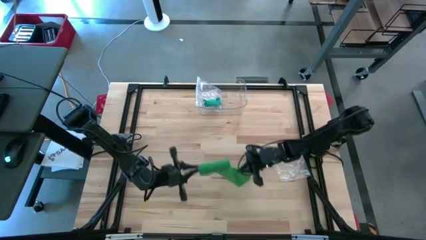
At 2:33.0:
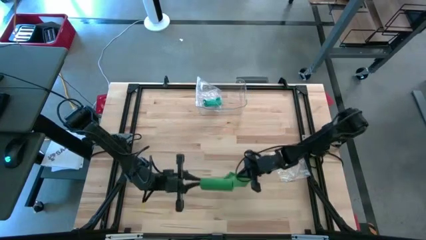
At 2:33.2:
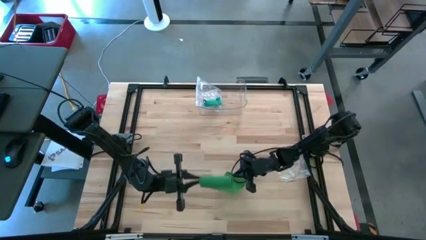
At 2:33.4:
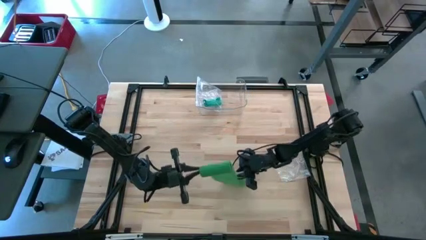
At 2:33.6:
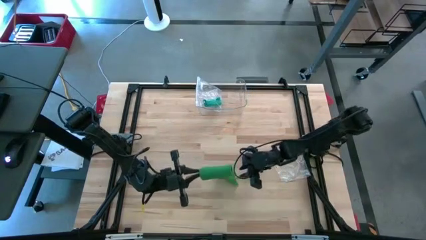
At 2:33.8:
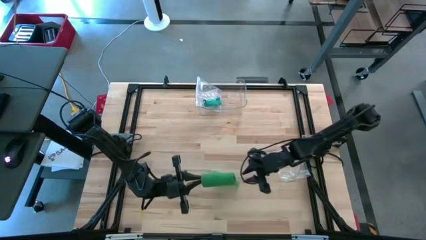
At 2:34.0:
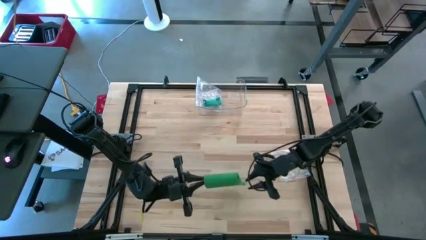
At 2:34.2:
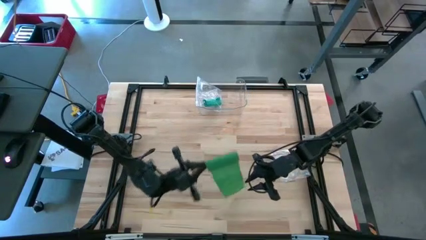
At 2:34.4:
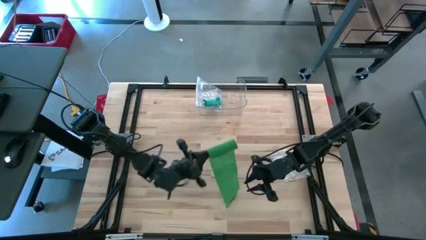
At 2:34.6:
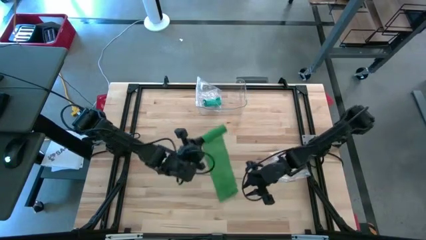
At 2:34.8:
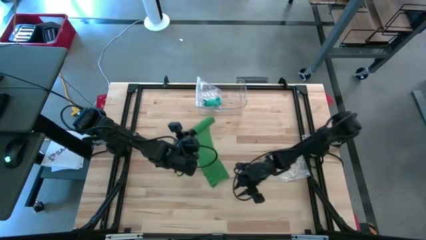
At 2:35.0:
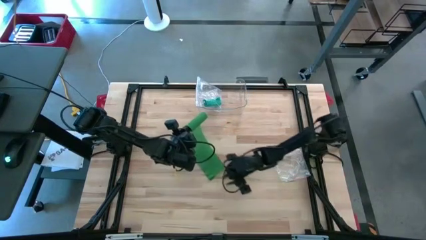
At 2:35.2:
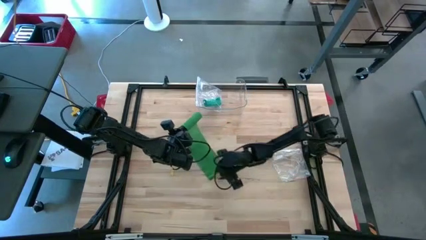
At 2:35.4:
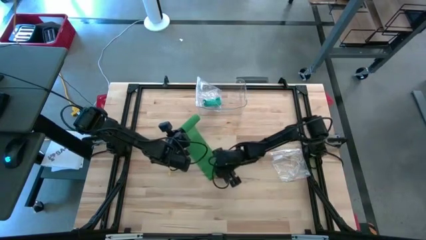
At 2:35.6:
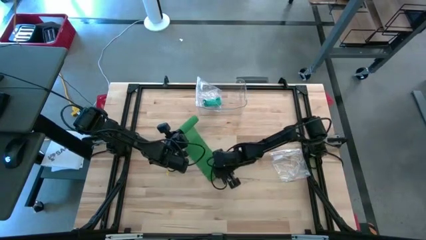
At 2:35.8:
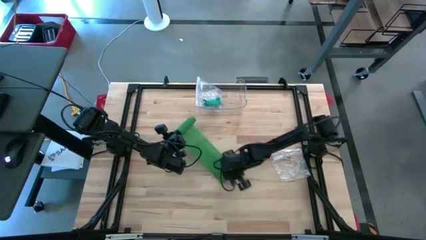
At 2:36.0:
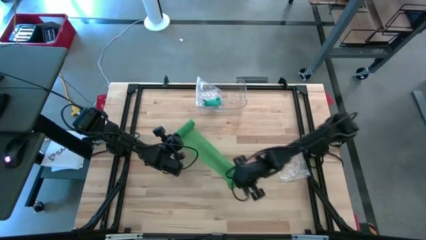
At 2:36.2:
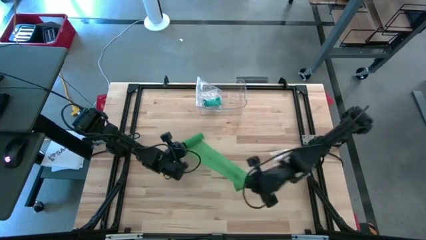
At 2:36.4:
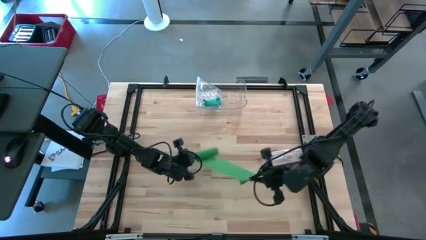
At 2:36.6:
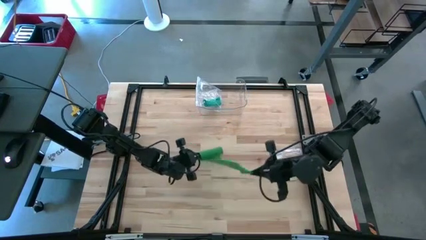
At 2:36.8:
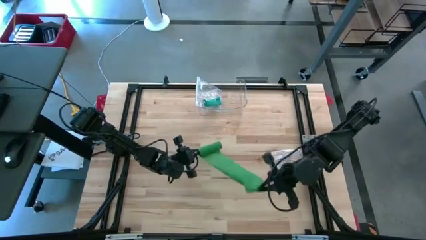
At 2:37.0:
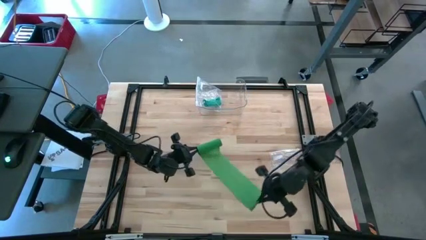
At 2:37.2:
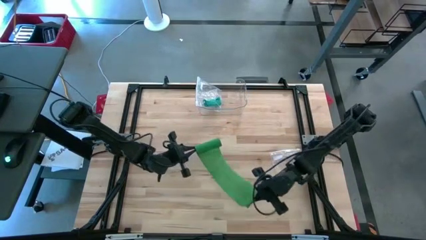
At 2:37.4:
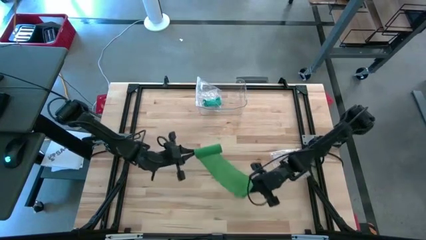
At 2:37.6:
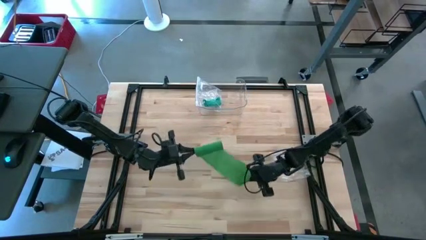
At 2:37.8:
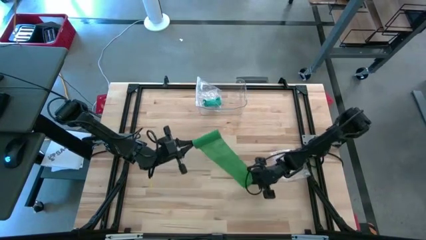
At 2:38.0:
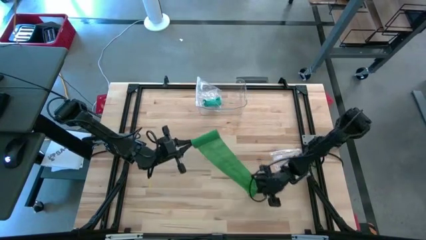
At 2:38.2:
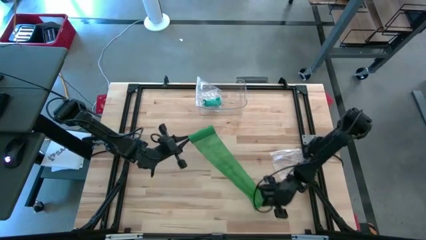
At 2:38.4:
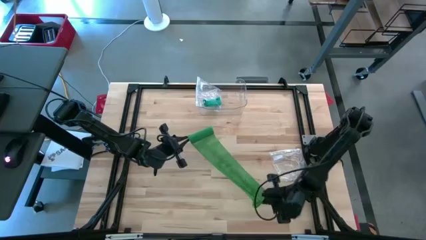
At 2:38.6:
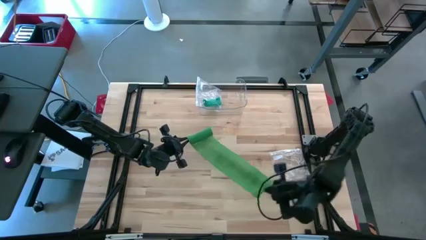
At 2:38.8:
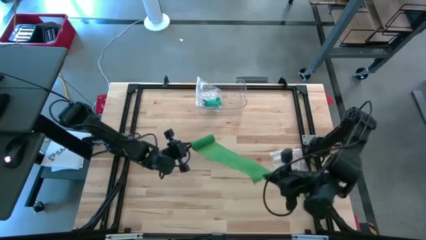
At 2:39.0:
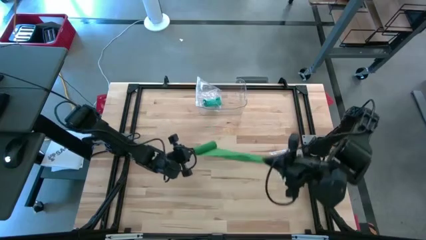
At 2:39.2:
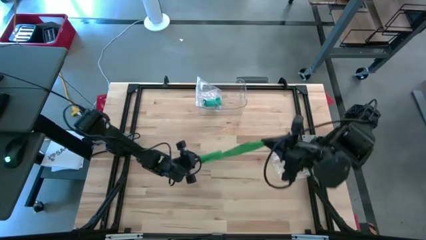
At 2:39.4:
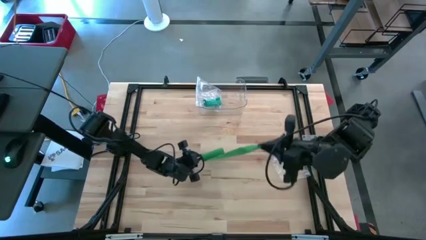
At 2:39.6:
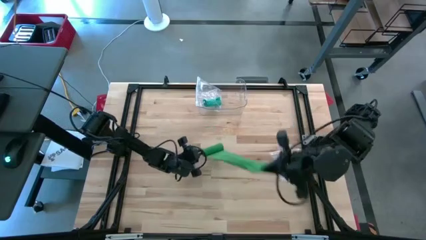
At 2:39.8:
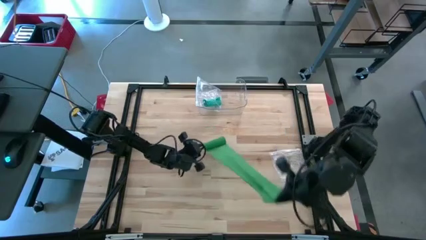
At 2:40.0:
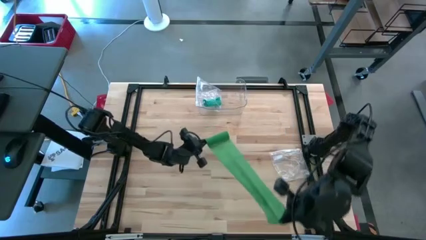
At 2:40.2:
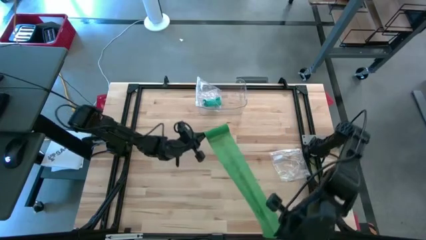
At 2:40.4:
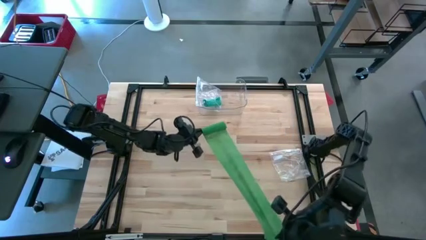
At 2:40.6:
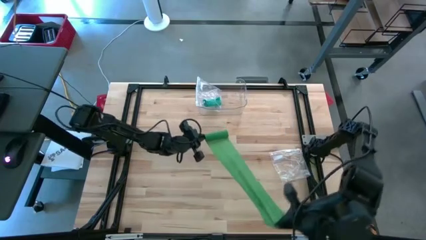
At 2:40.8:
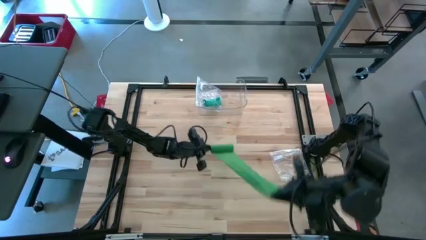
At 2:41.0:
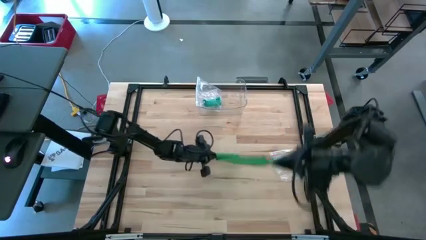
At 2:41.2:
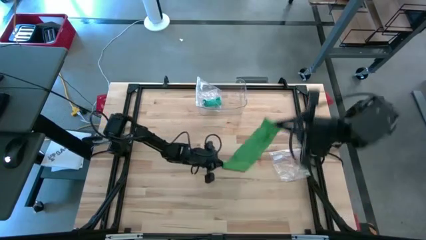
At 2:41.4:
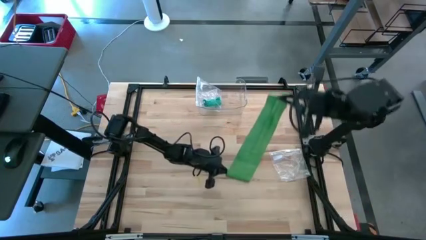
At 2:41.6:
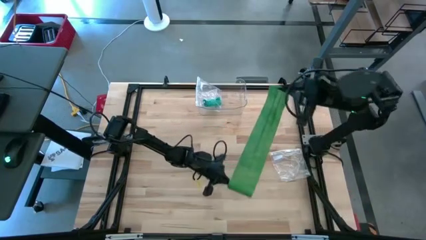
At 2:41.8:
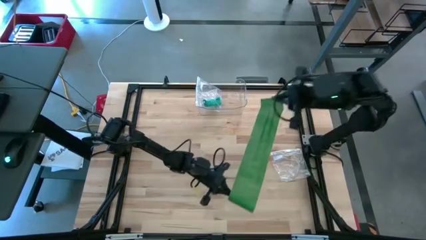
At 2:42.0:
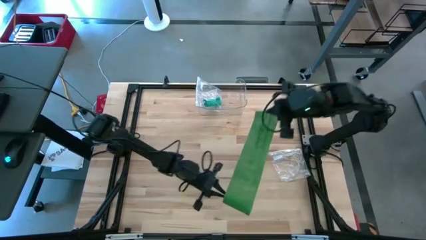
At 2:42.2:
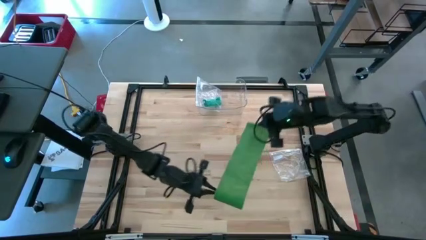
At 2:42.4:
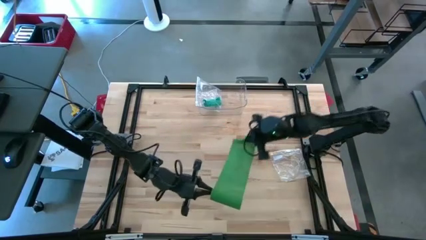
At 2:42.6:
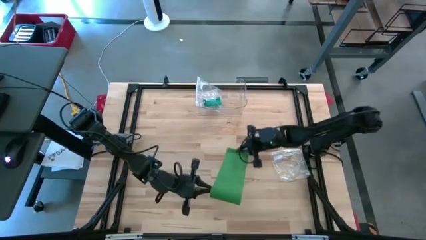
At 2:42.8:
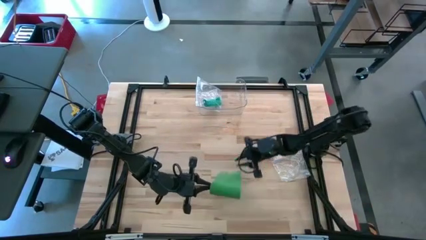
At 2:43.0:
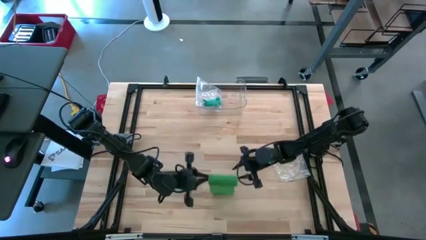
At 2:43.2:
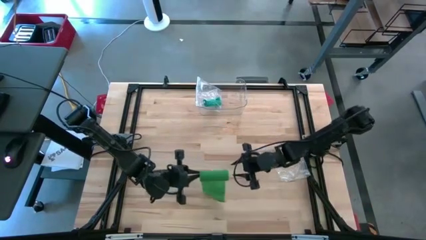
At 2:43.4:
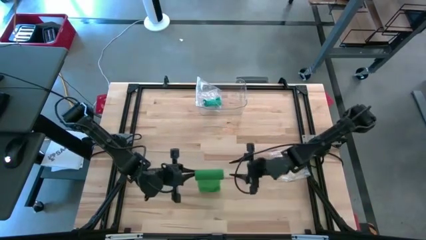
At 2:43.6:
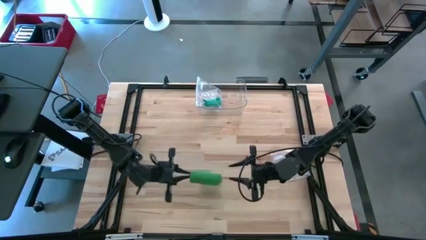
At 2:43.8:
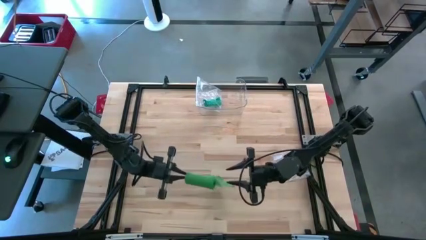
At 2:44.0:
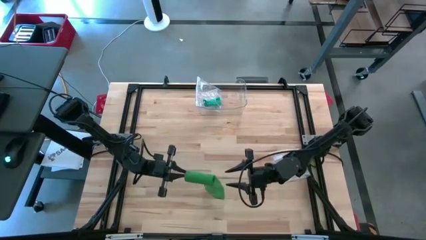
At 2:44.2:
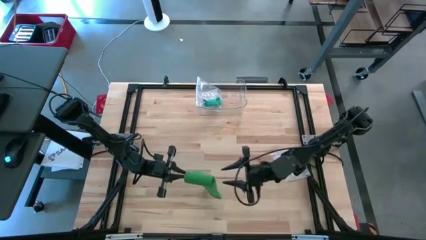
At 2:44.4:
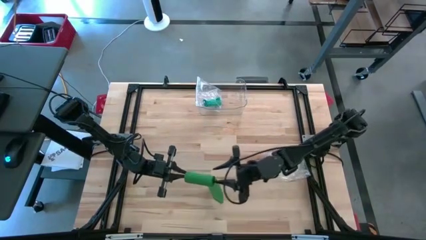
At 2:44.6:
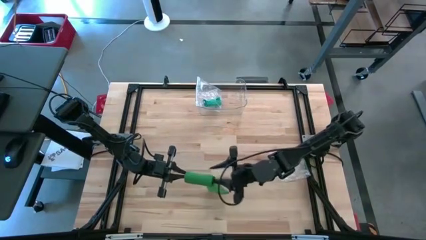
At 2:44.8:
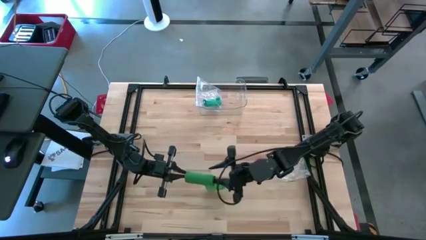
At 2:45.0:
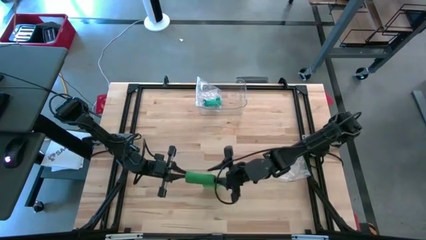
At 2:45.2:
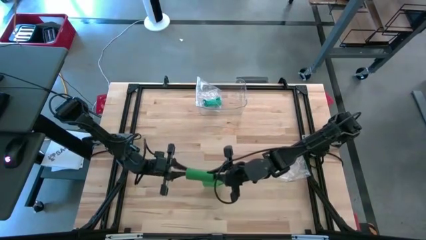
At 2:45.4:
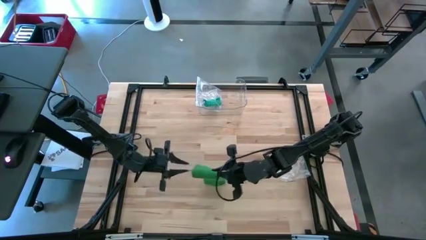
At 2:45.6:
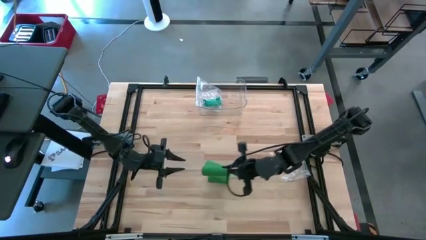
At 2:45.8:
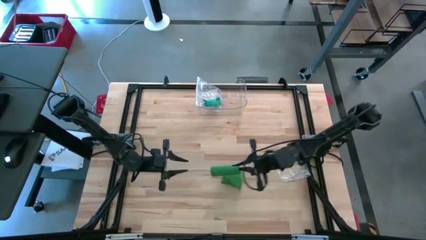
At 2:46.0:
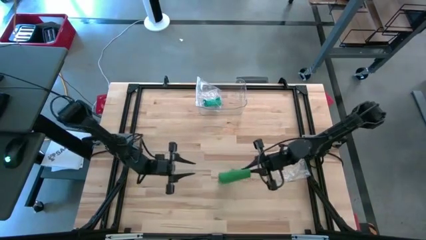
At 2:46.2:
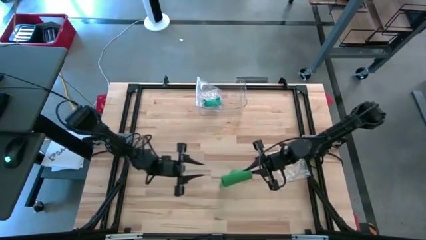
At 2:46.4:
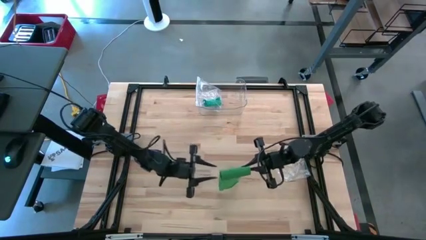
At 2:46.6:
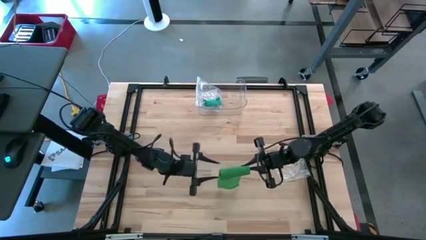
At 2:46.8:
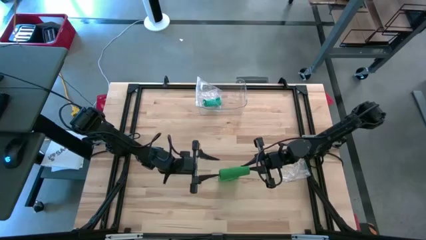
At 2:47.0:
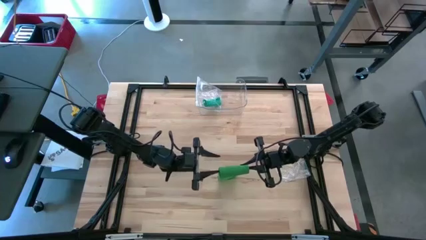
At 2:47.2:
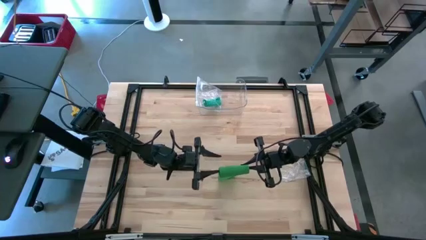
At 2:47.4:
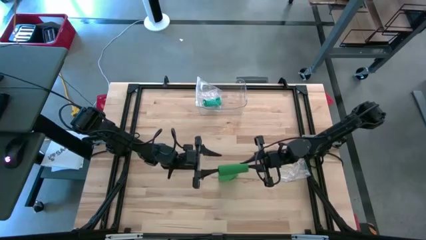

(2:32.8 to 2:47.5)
Task: Roll bandage
Roll the green bandage
